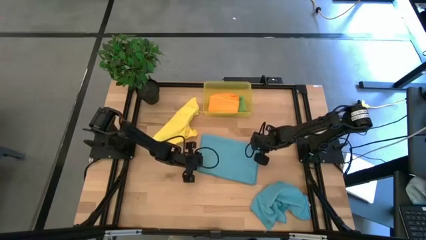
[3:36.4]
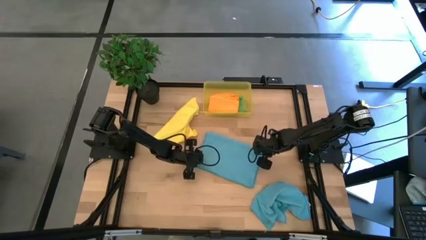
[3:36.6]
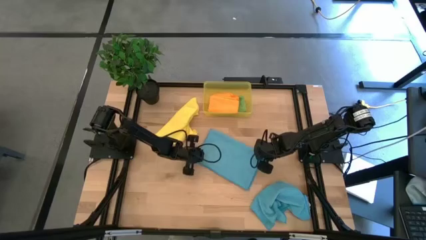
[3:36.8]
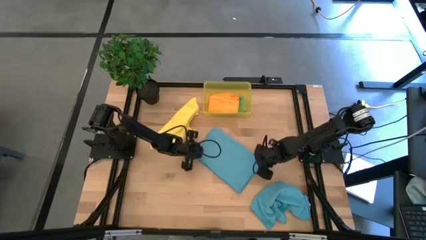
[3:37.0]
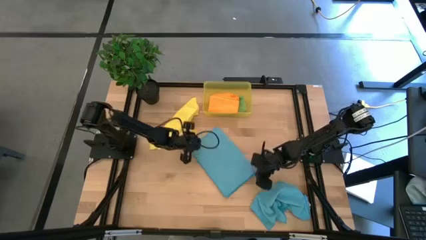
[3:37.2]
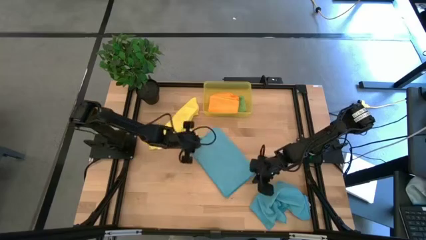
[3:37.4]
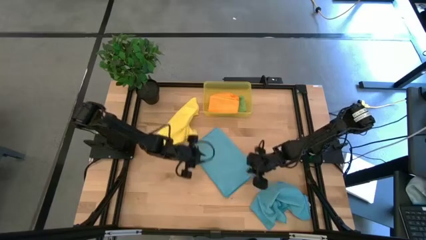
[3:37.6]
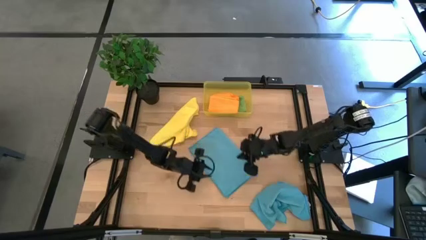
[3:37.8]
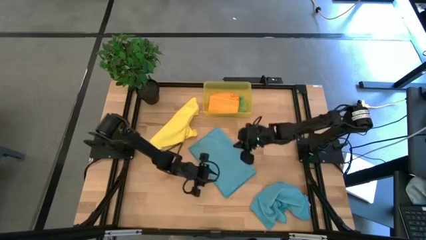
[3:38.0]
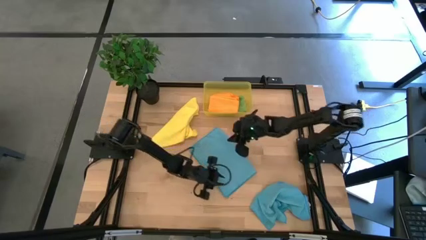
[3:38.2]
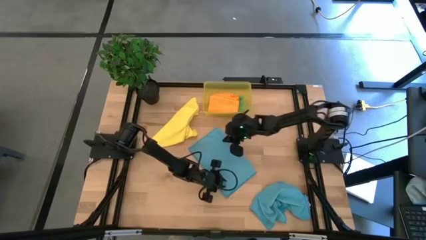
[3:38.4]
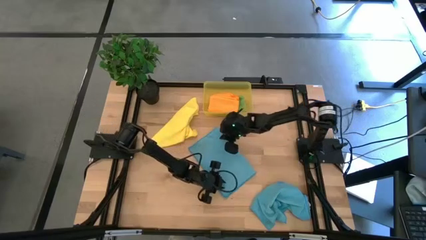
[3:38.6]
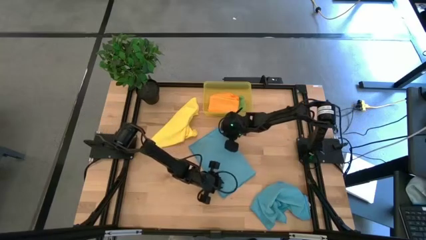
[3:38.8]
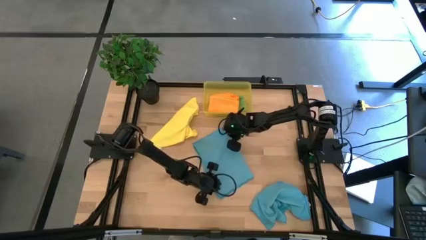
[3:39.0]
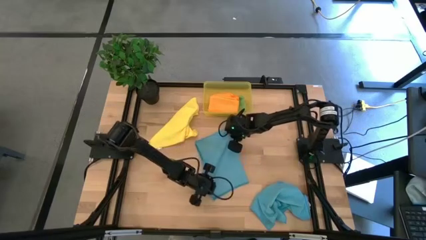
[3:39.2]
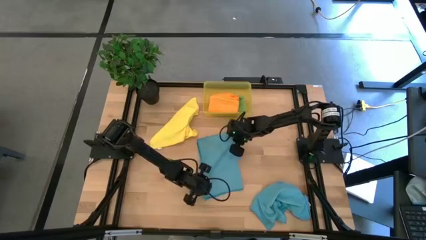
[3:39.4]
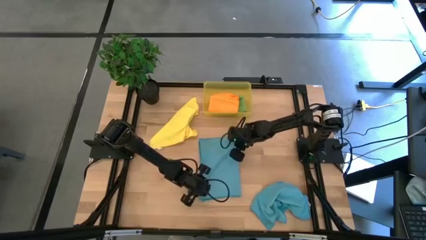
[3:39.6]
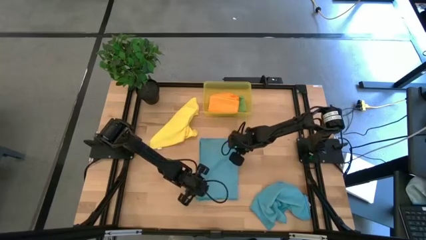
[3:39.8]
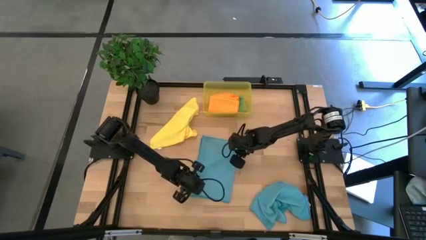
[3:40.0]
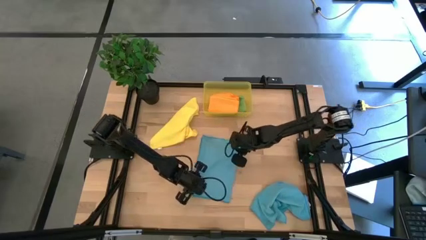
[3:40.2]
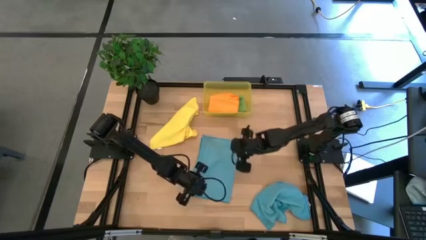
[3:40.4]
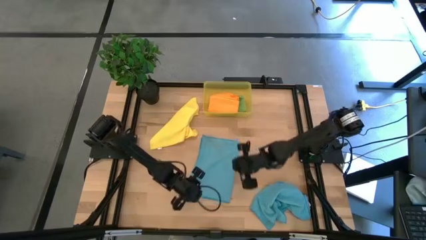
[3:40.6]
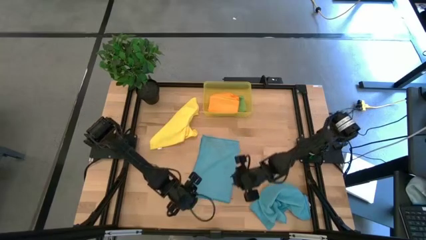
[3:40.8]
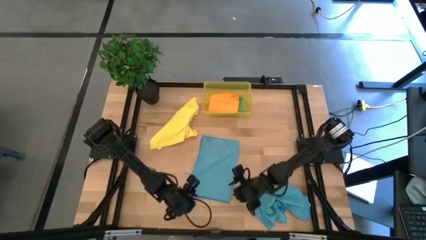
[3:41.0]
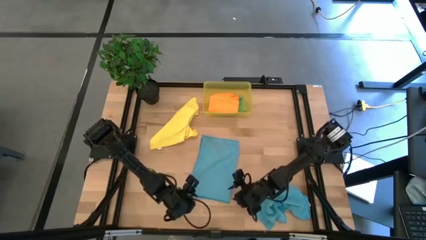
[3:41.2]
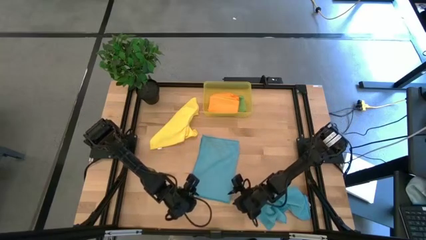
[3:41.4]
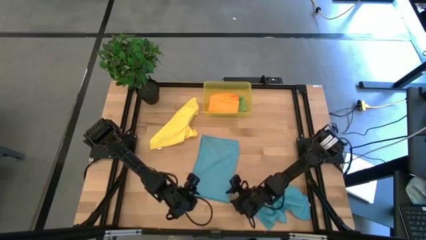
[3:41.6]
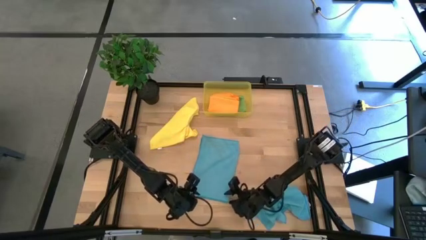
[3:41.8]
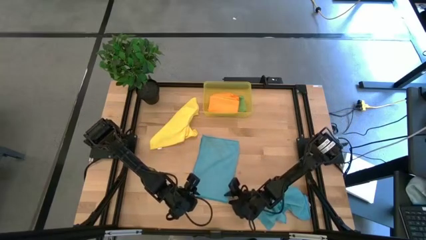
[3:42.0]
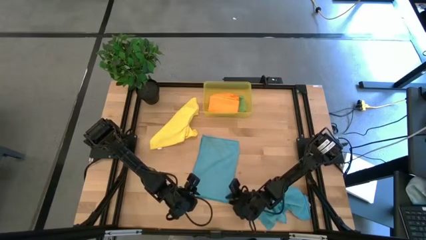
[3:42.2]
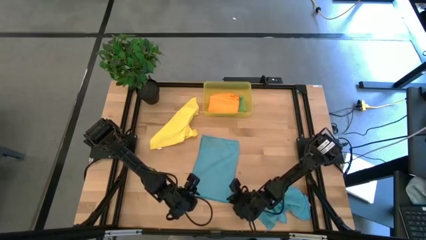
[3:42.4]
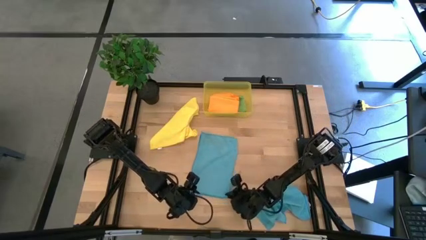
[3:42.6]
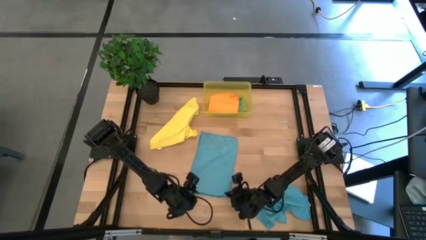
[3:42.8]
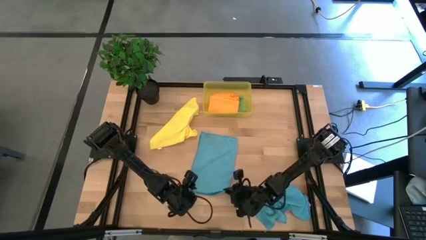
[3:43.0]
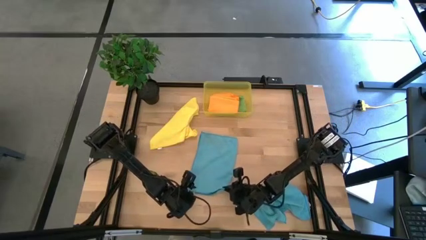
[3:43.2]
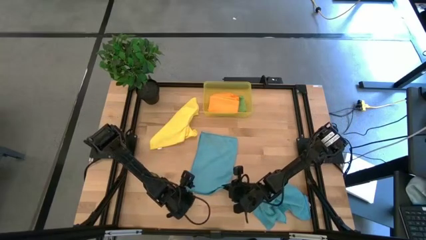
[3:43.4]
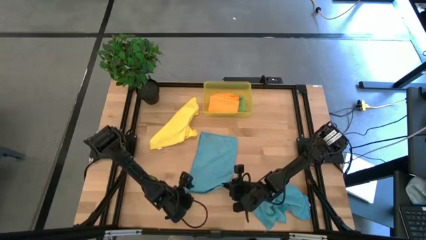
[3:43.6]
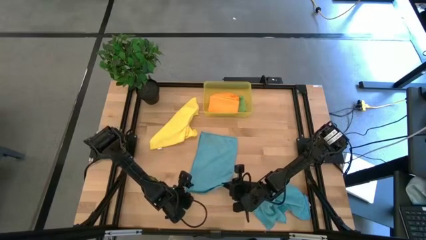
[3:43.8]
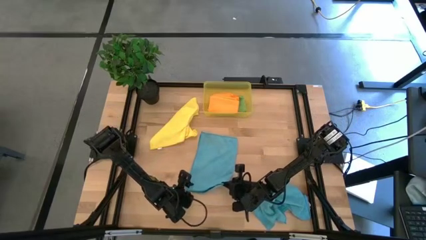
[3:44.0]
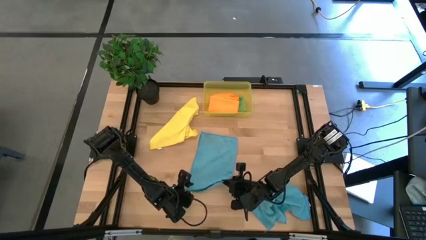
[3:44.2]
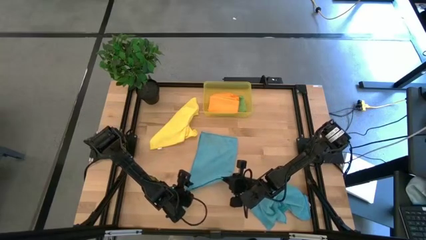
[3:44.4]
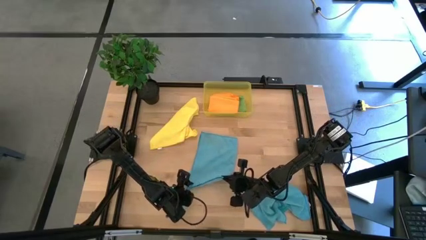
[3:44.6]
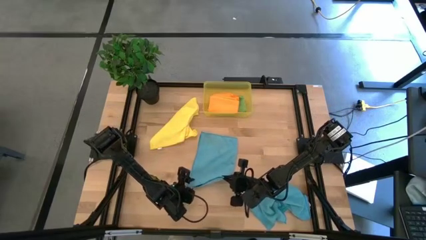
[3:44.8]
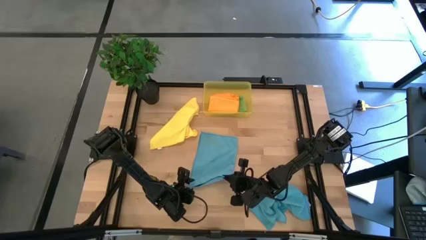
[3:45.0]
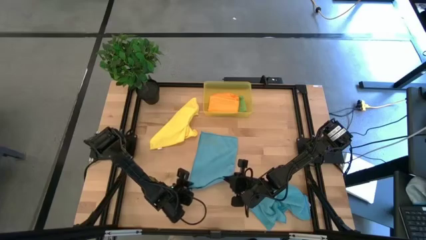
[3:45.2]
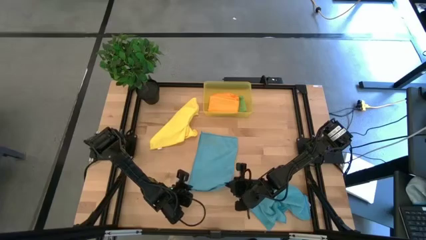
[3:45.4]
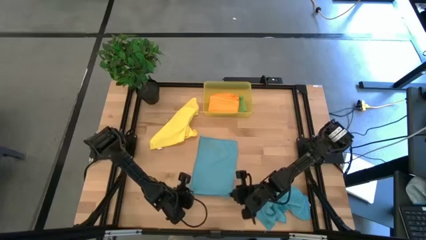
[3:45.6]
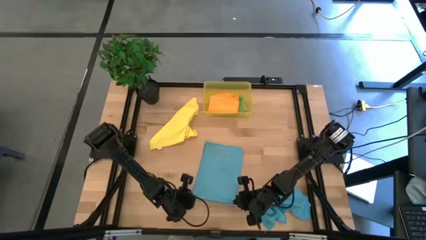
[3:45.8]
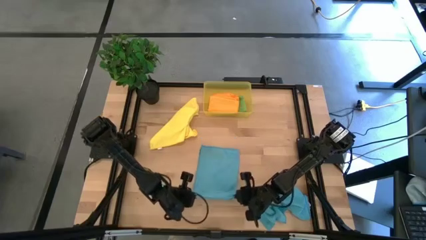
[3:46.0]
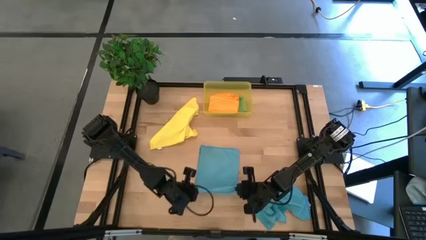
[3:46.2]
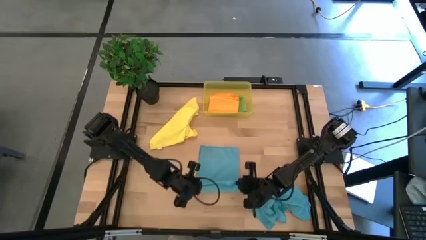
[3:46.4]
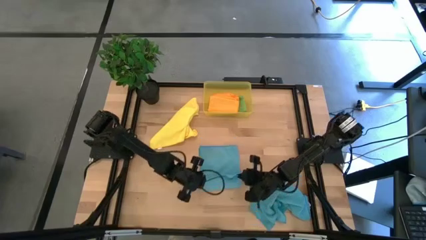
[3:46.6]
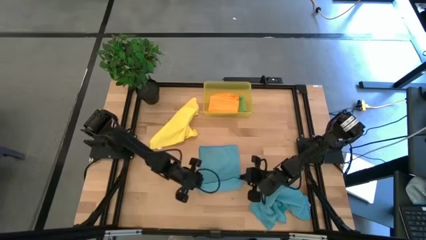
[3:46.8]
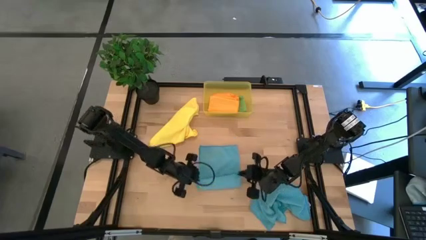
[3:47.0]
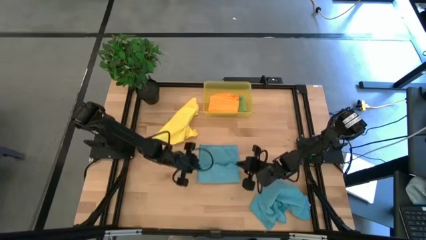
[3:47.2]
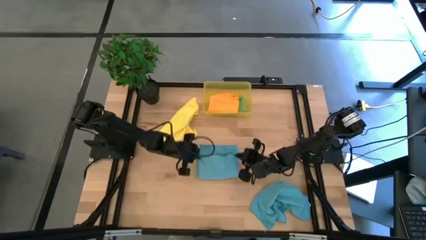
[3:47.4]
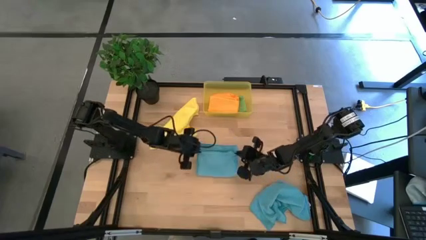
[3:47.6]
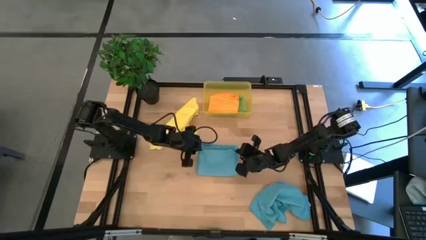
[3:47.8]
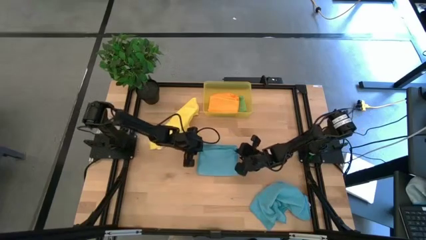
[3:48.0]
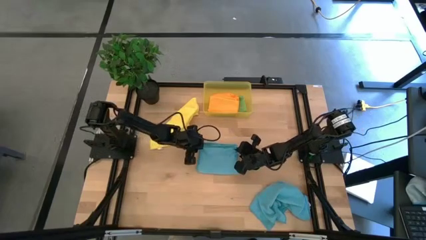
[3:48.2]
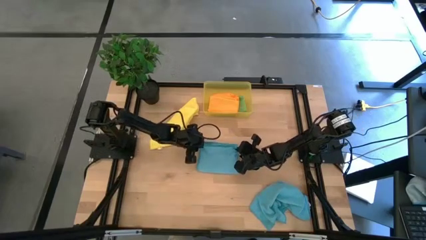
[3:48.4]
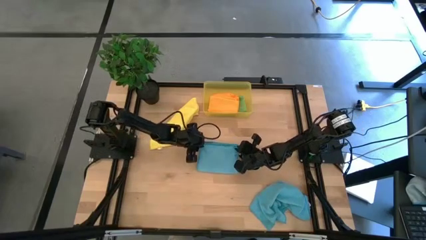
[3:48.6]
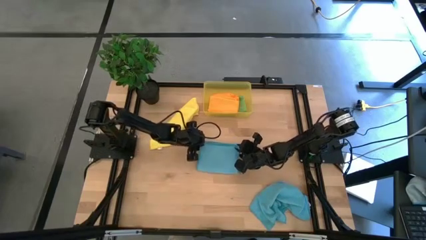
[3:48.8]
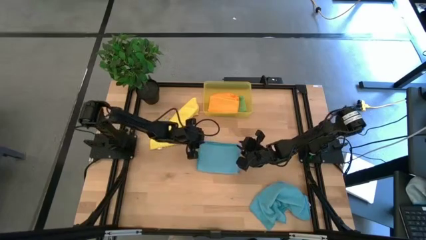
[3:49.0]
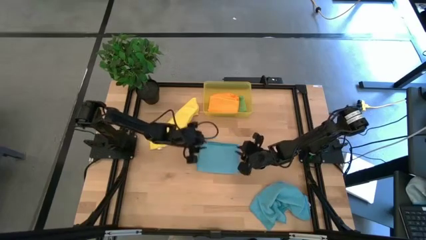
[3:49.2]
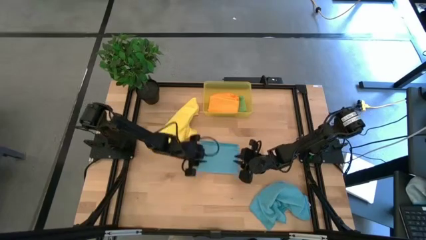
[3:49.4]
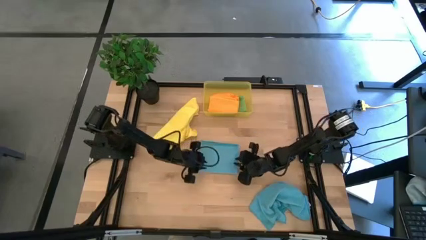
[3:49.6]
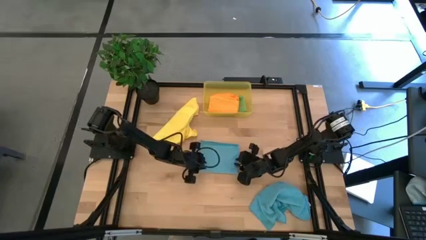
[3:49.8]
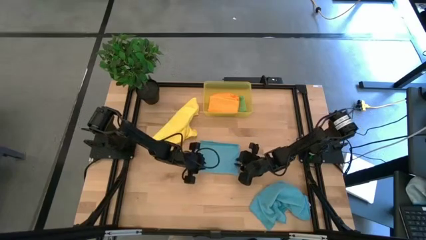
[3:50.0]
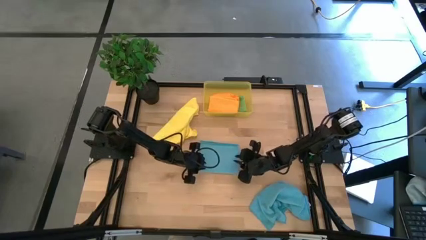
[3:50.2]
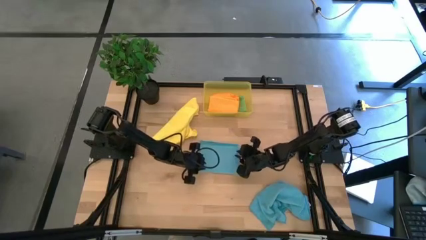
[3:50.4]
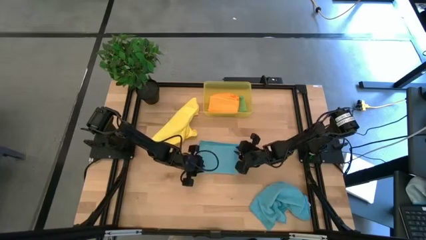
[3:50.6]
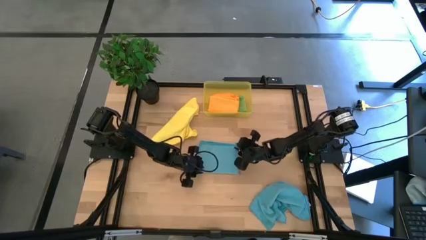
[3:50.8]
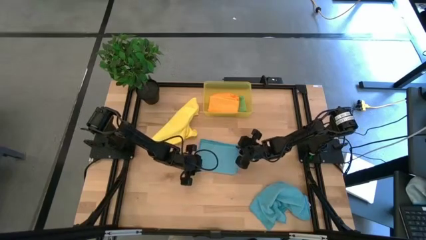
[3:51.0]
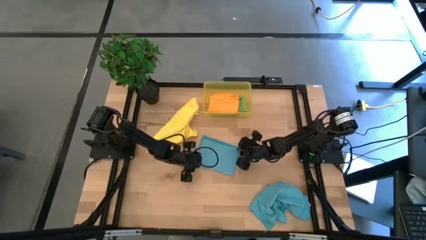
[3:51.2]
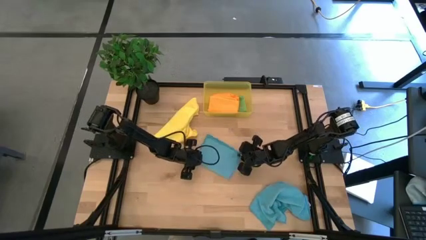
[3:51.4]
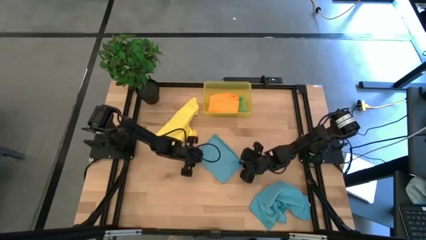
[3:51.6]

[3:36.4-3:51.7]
Task: Fold microfiber towels
Fold the top blue microfiber cloth
